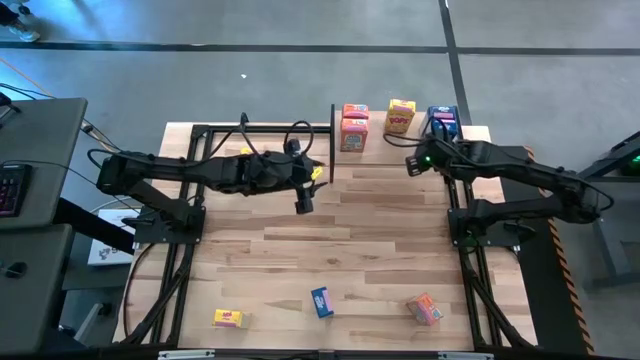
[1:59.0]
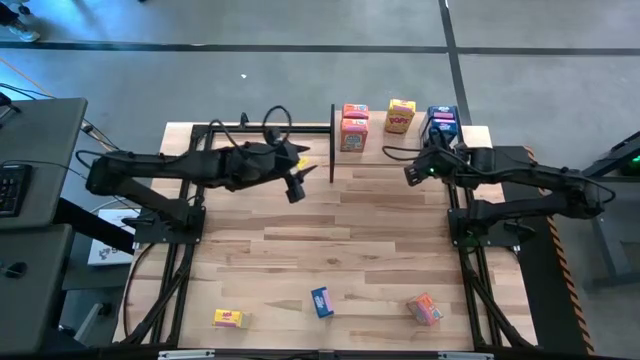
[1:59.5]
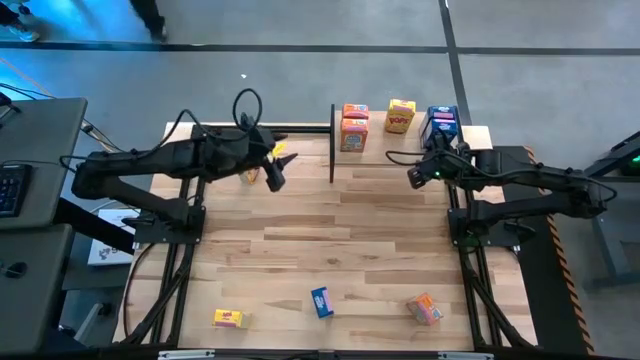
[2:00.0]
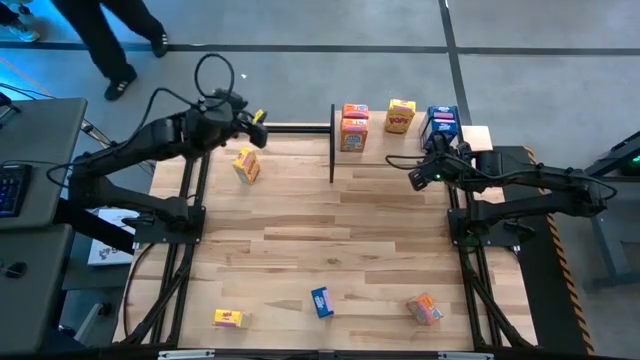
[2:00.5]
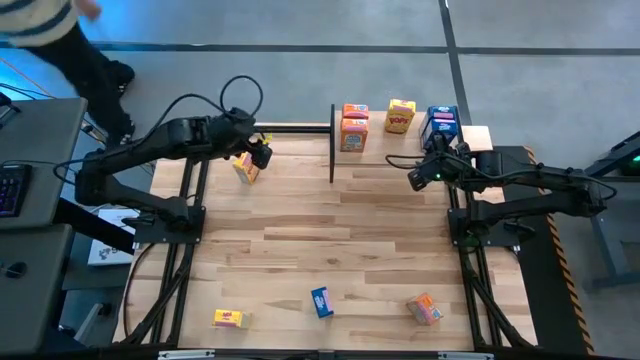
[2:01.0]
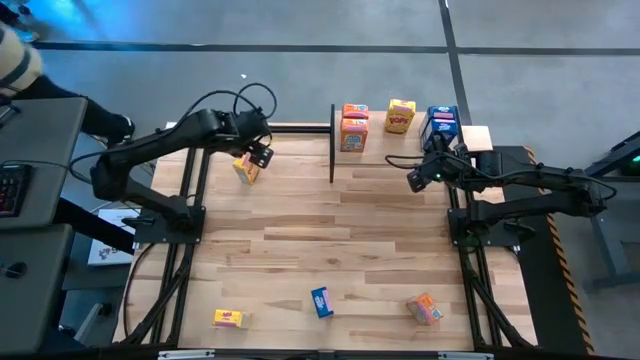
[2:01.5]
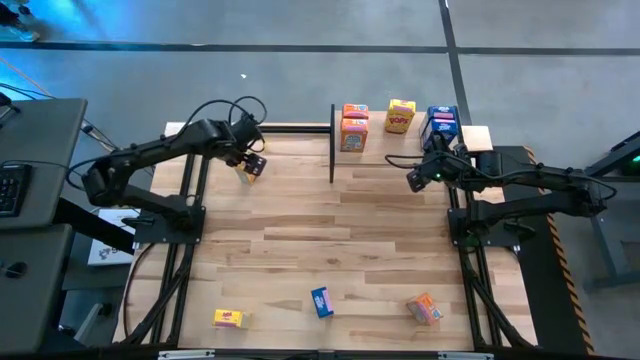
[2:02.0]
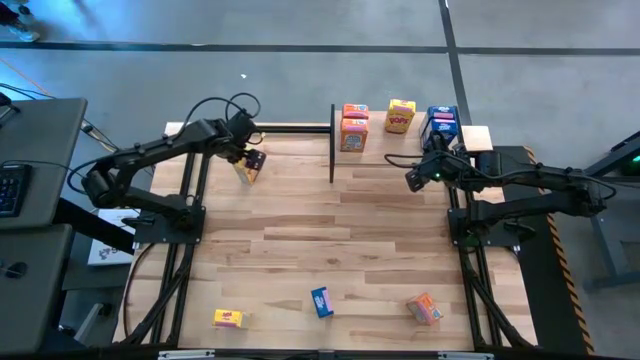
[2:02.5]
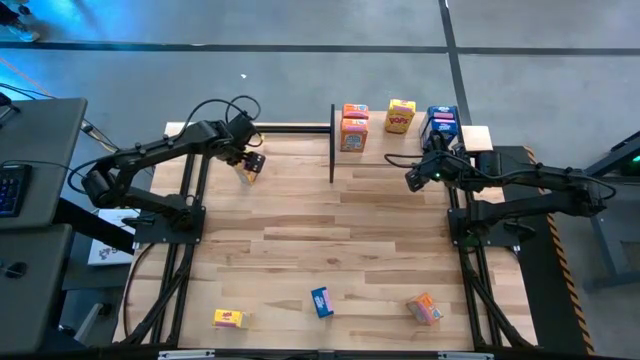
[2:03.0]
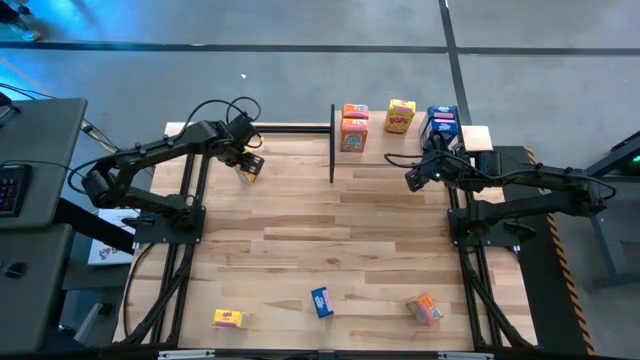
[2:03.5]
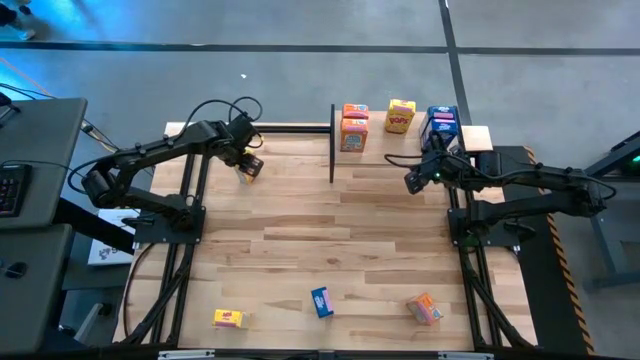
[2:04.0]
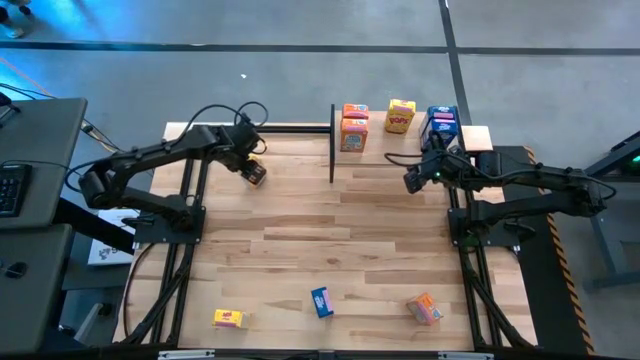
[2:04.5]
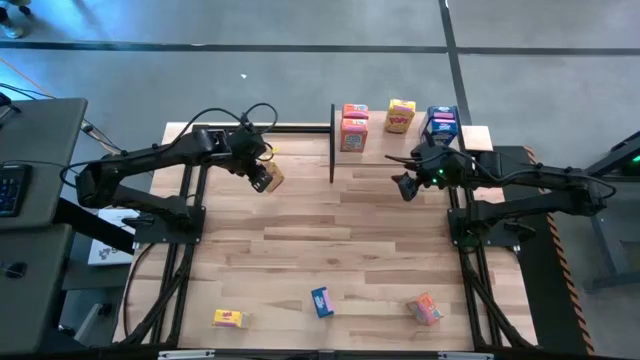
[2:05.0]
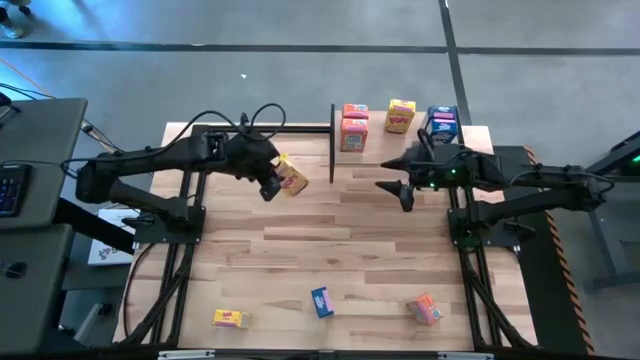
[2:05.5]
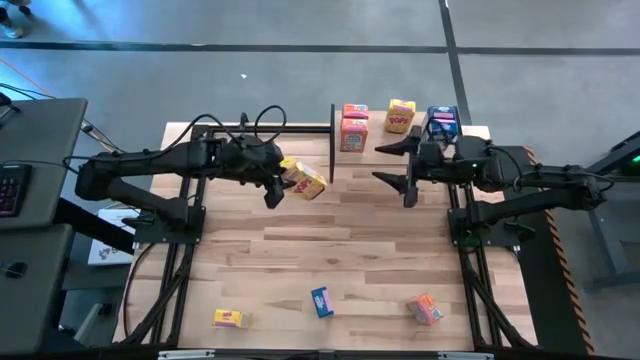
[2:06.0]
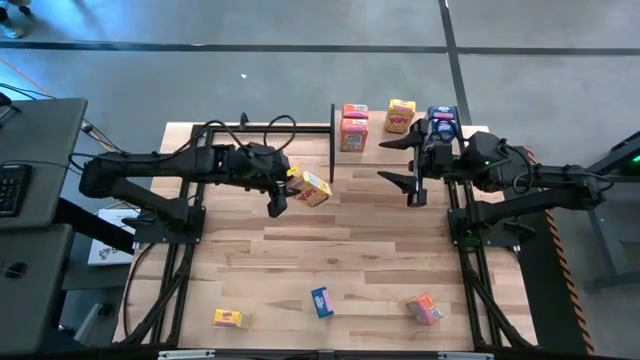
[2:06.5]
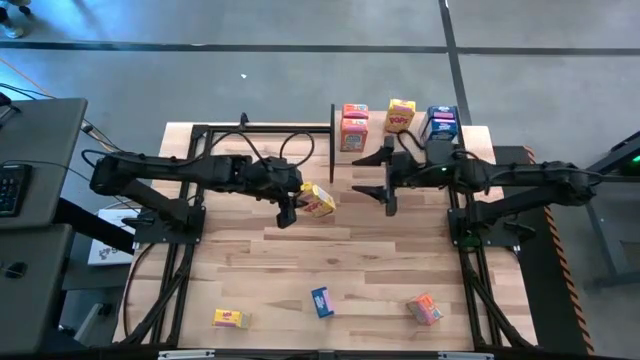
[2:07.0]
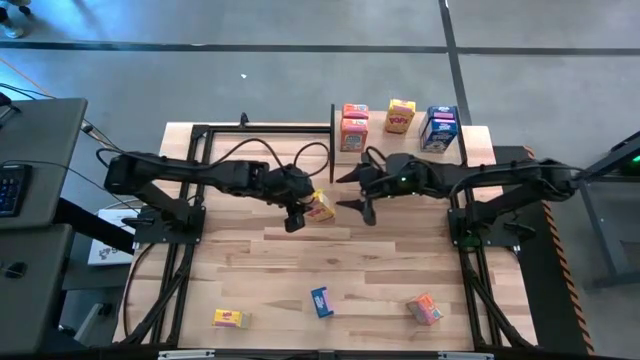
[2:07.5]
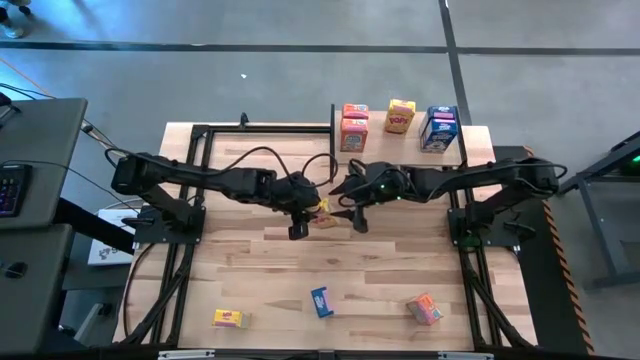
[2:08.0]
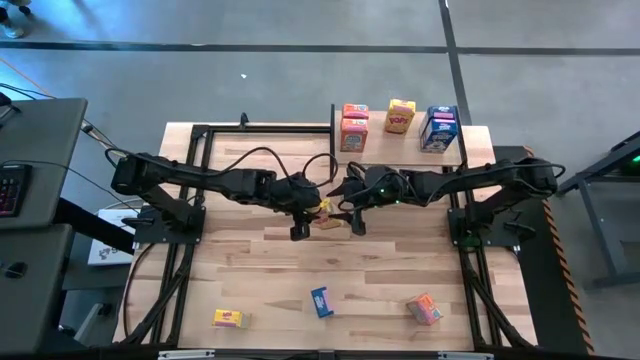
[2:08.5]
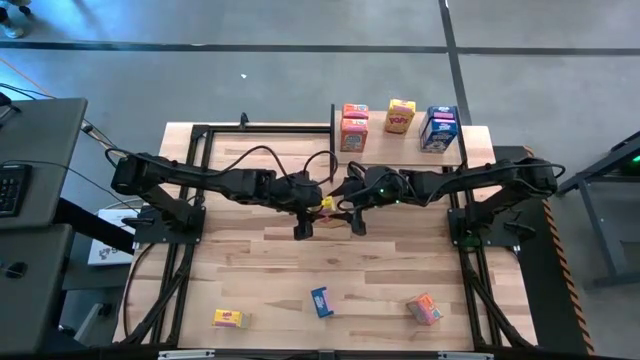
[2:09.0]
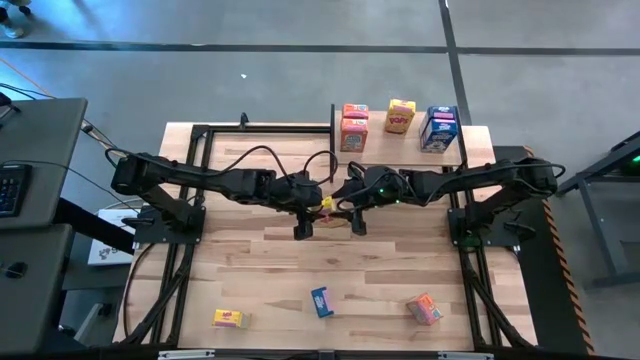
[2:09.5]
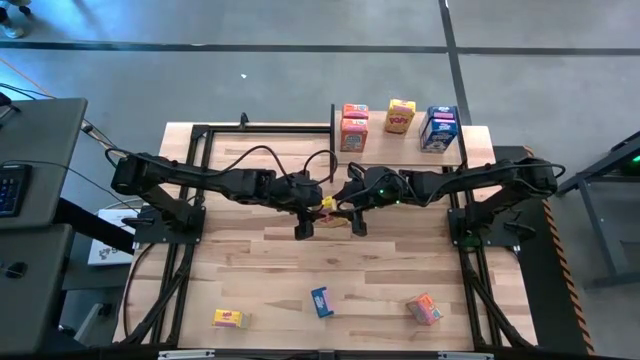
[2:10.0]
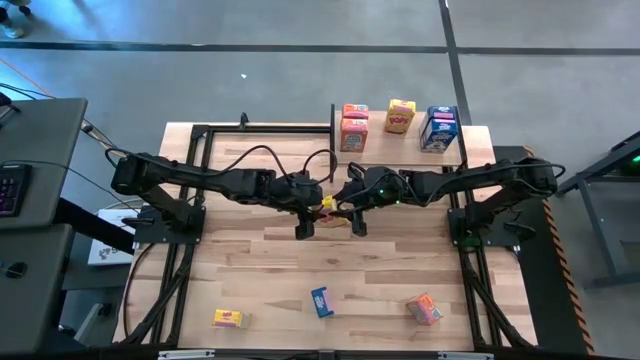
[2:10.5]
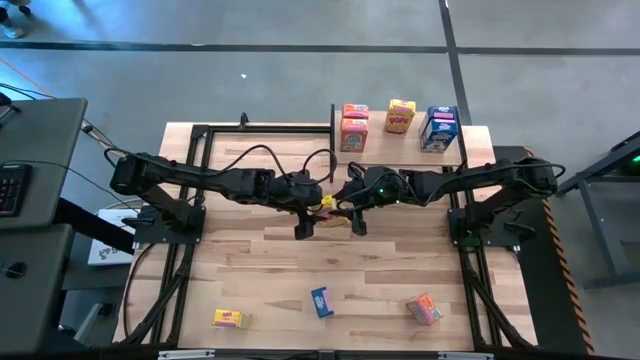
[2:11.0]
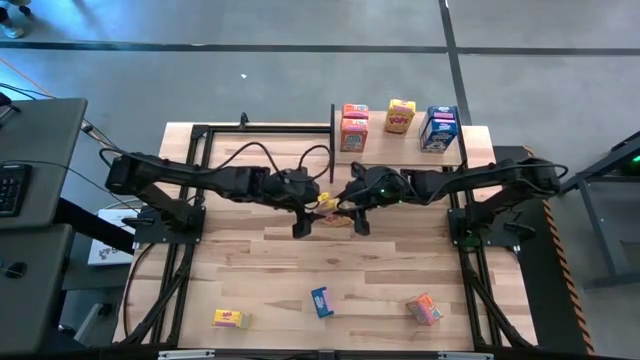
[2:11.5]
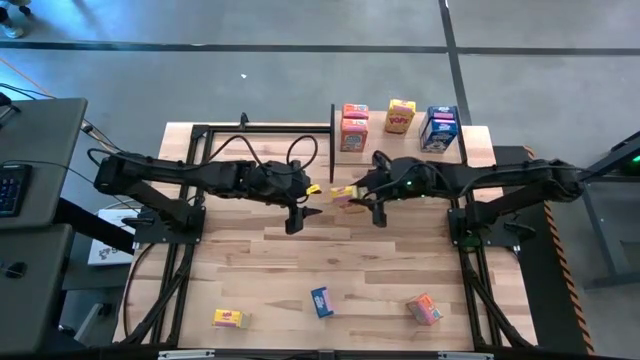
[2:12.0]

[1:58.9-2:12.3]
Task: Stack cereal on shelf
Put the top yellow cereal box on the shelf aligned with the other yellow cereal box

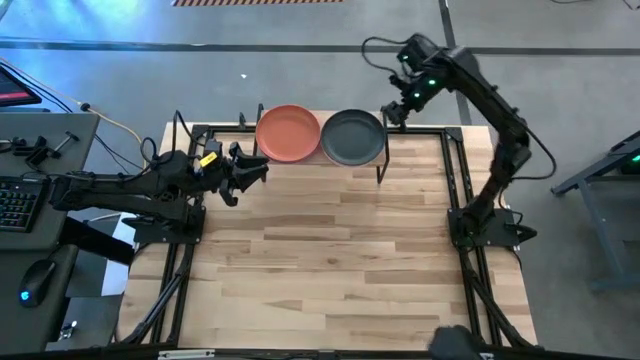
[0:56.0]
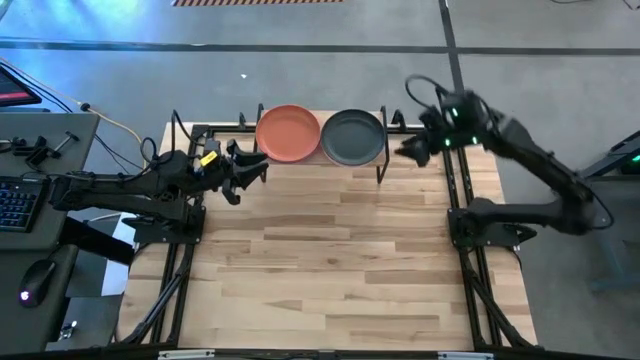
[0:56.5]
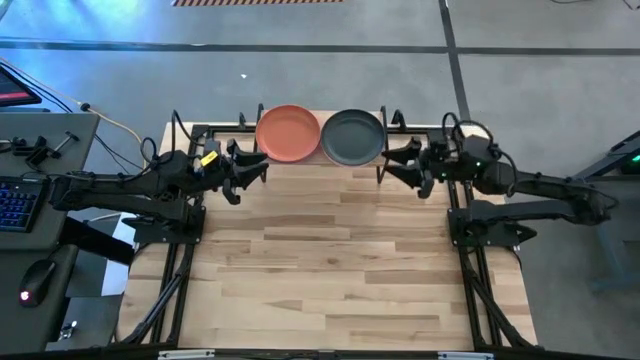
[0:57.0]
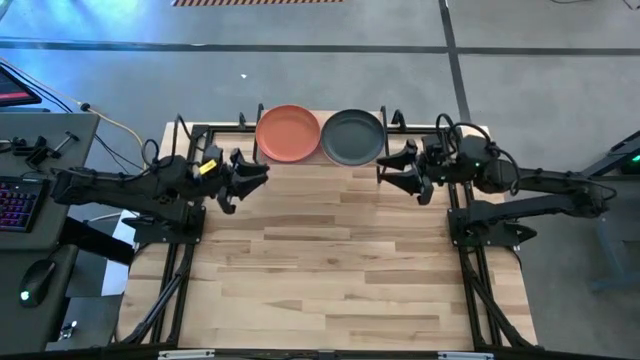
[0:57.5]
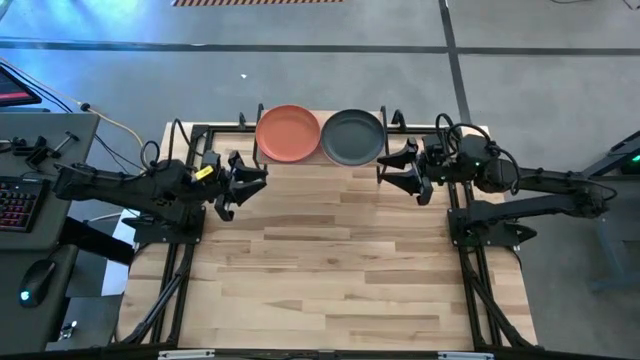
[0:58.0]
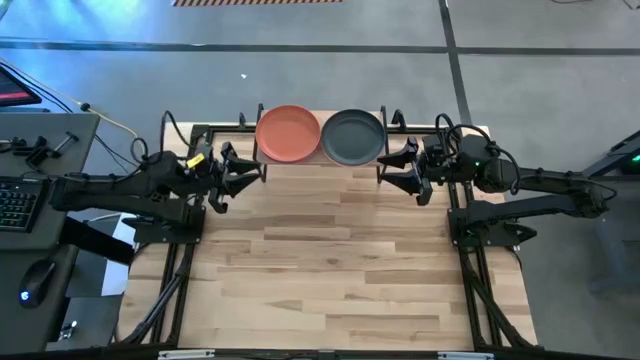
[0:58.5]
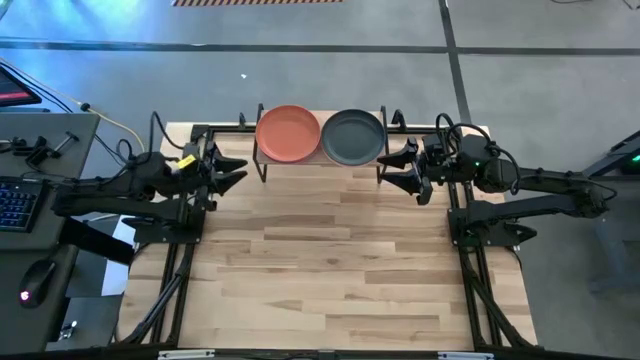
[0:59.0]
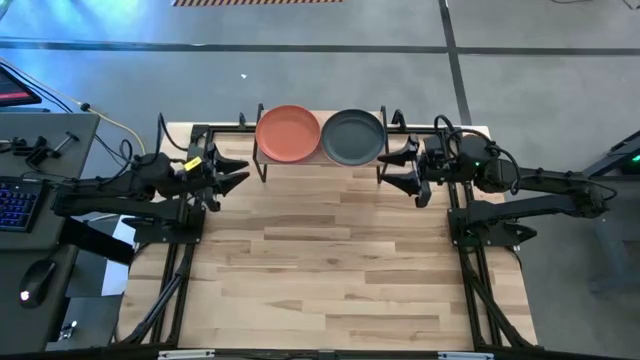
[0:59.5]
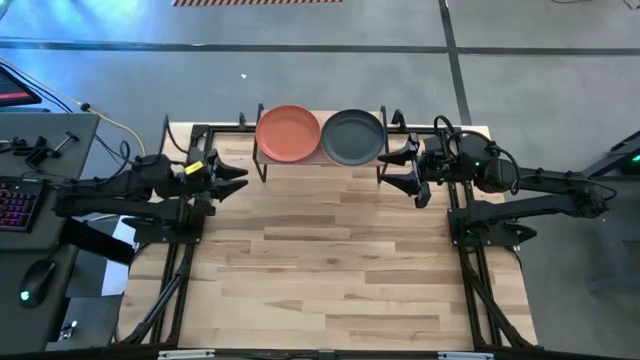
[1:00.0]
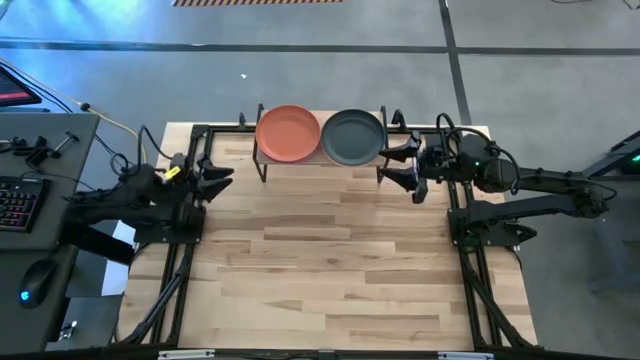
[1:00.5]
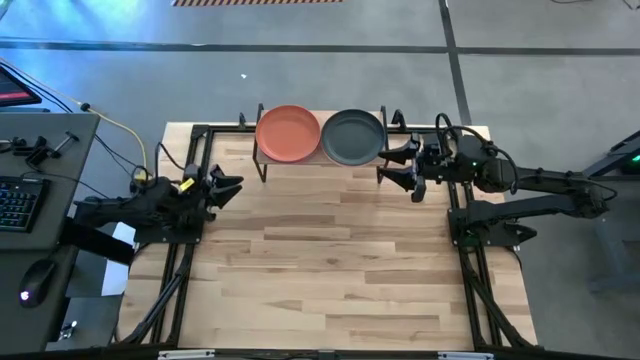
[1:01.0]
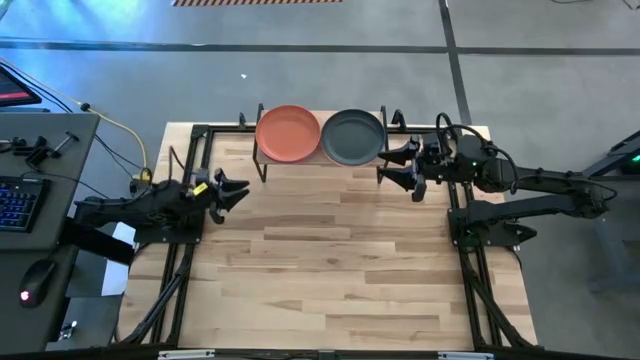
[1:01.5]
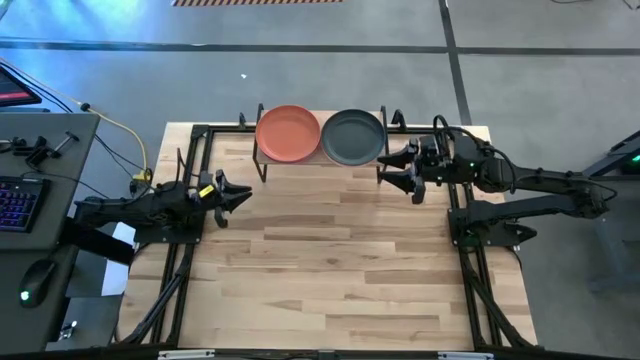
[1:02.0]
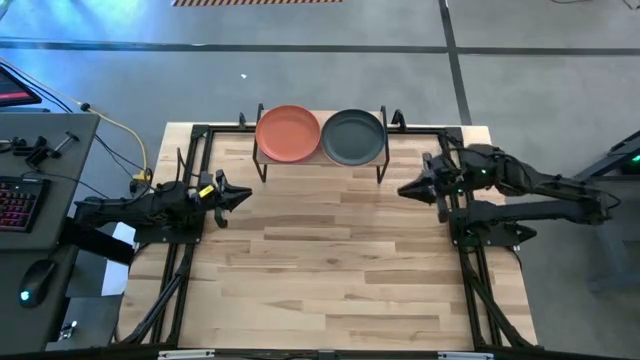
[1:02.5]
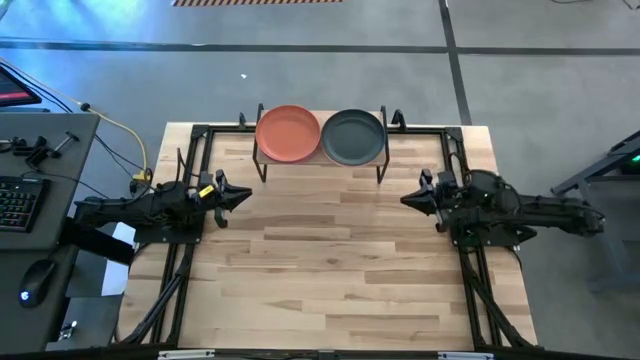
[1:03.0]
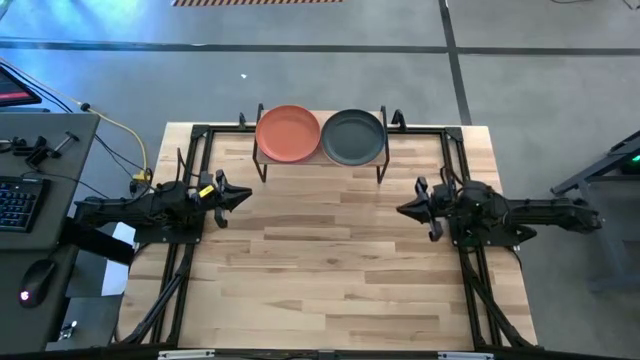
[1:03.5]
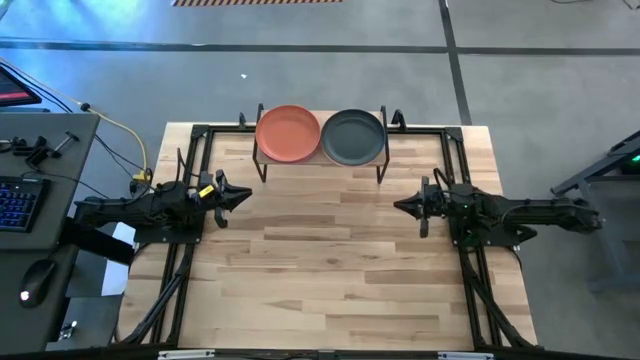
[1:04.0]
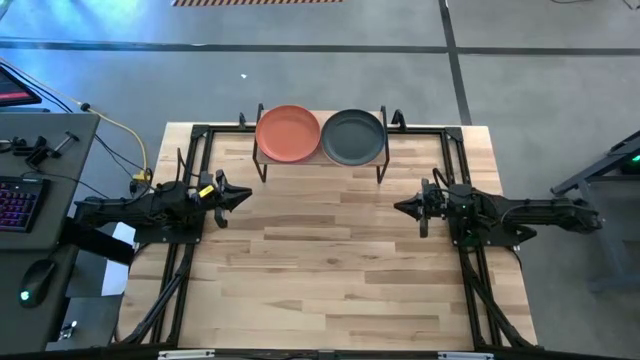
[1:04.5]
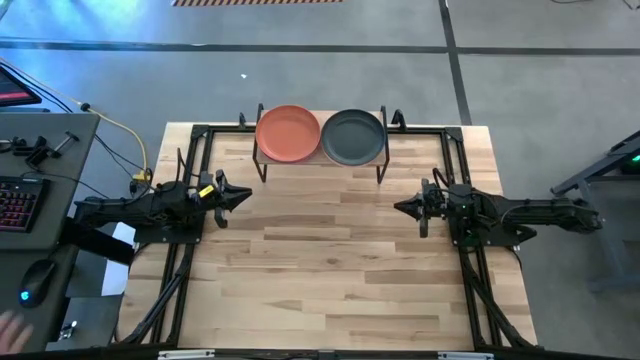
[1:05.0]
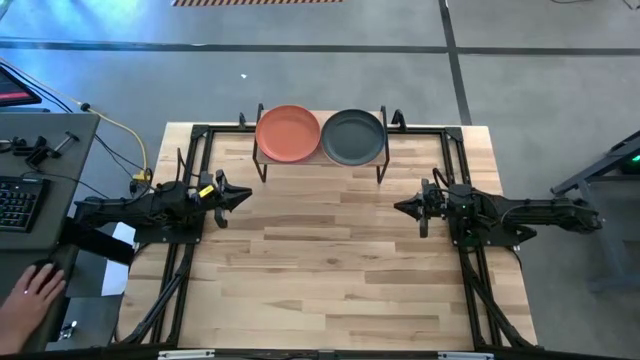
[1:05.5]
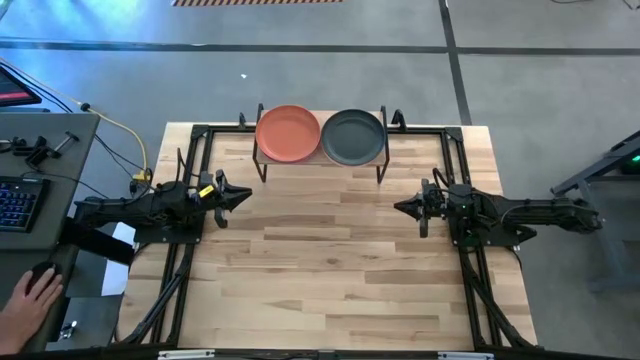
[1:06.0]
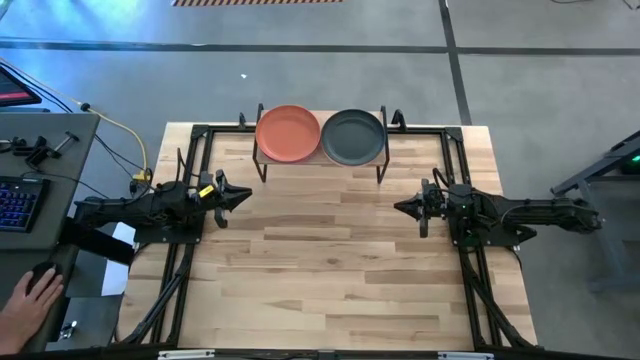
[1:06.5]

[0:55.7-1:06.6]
Task: Place and stack plates onto a shelf
Return to Home Position
